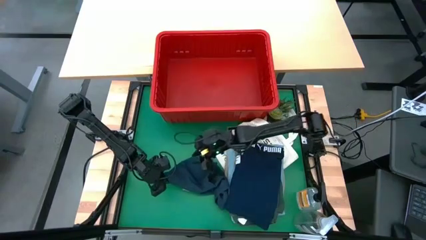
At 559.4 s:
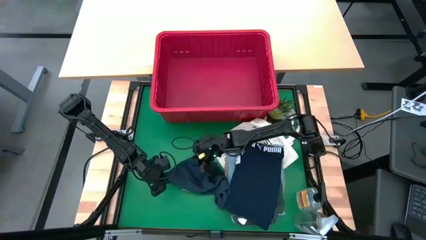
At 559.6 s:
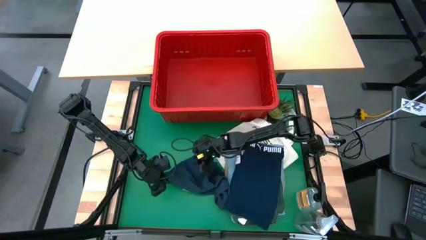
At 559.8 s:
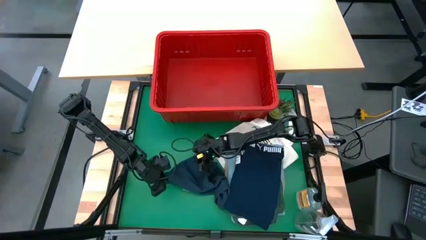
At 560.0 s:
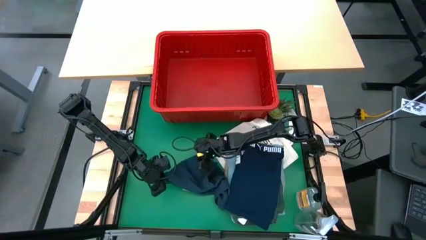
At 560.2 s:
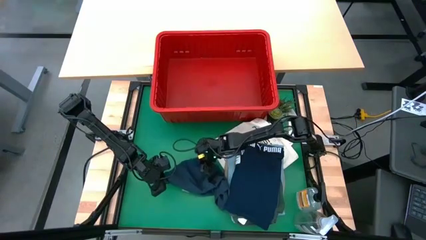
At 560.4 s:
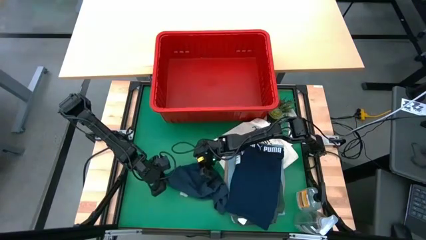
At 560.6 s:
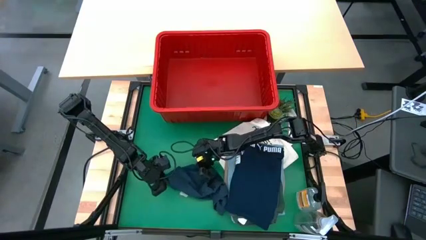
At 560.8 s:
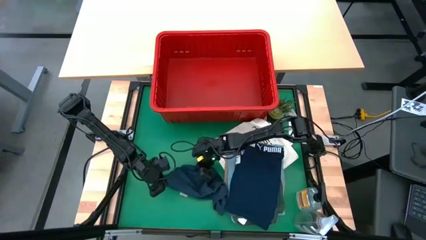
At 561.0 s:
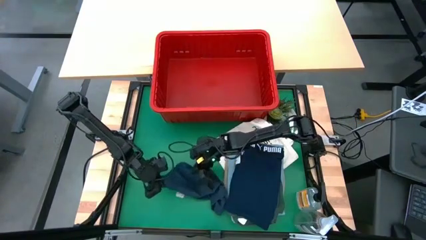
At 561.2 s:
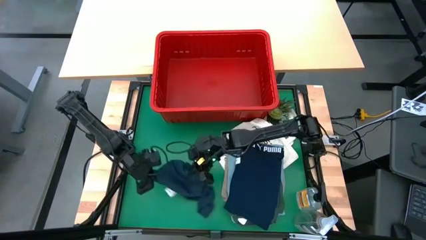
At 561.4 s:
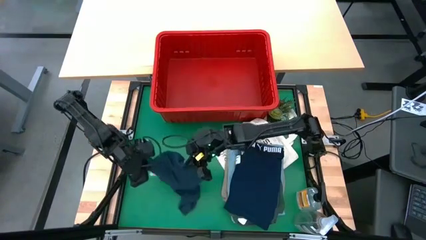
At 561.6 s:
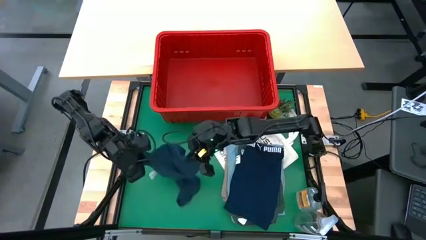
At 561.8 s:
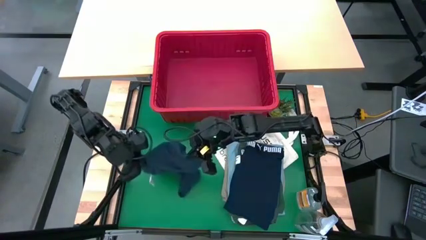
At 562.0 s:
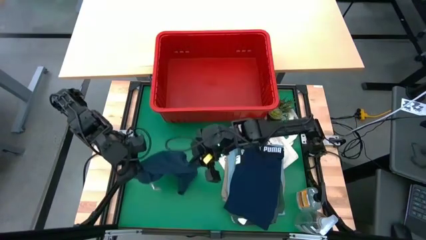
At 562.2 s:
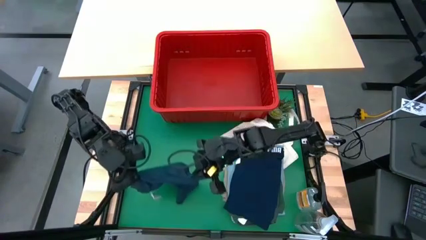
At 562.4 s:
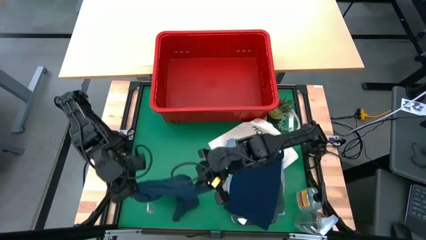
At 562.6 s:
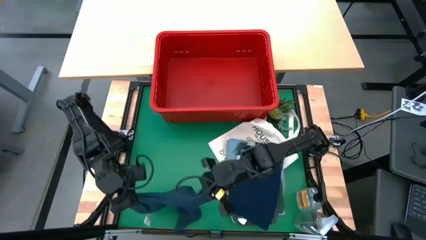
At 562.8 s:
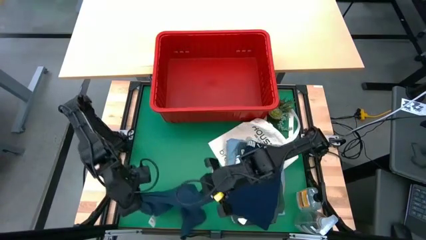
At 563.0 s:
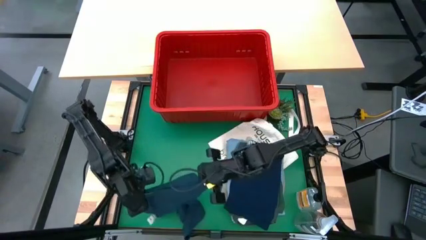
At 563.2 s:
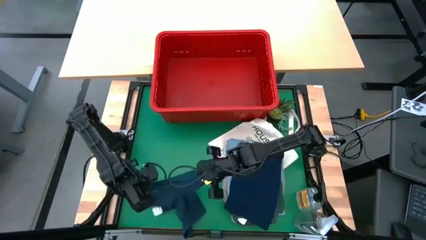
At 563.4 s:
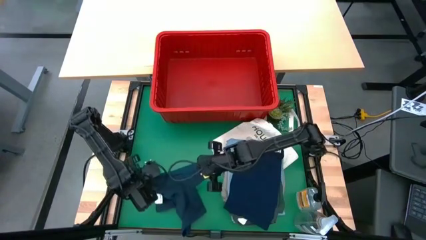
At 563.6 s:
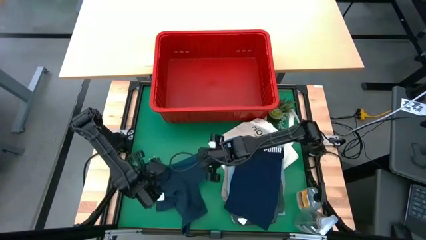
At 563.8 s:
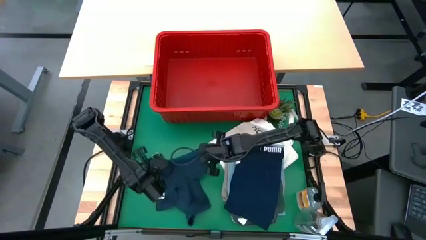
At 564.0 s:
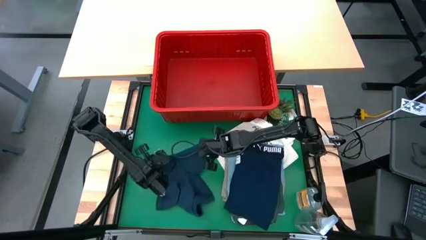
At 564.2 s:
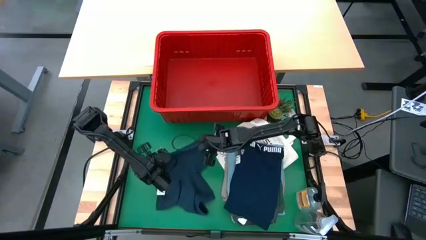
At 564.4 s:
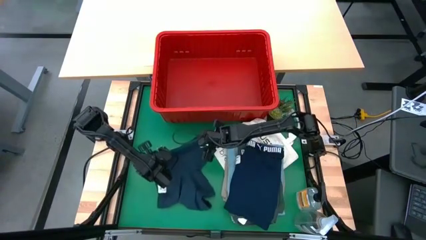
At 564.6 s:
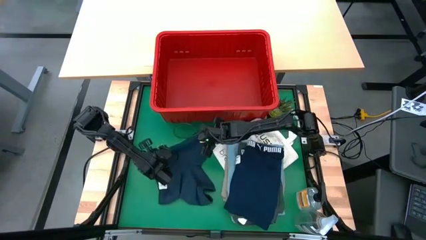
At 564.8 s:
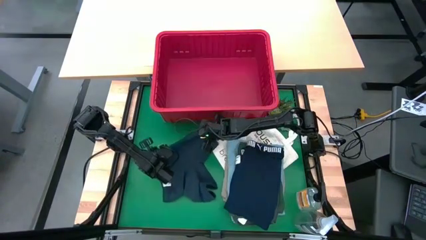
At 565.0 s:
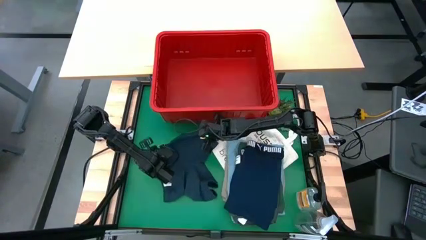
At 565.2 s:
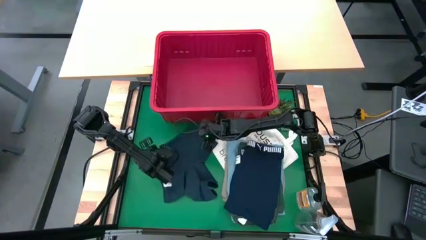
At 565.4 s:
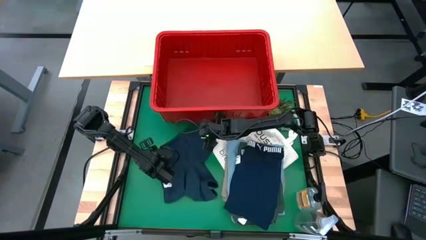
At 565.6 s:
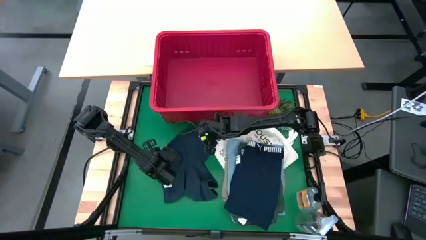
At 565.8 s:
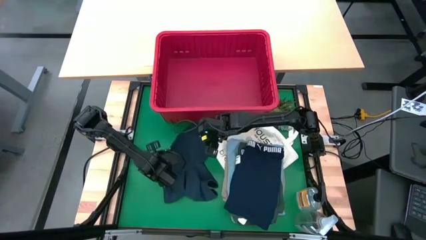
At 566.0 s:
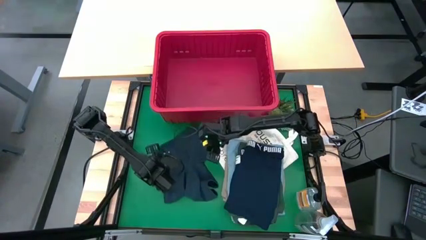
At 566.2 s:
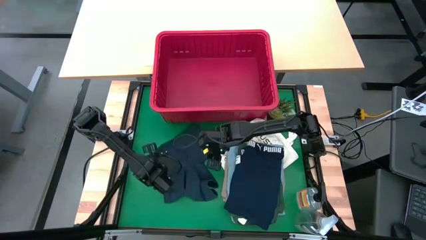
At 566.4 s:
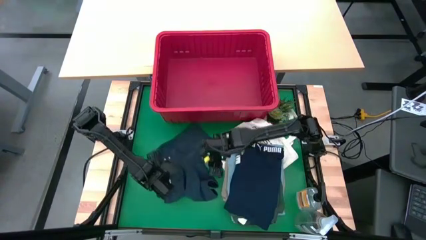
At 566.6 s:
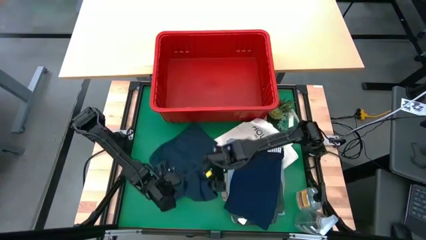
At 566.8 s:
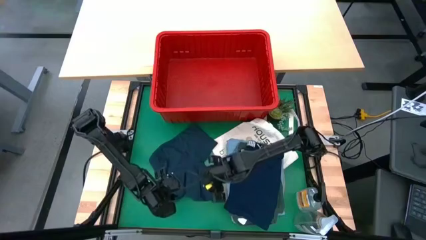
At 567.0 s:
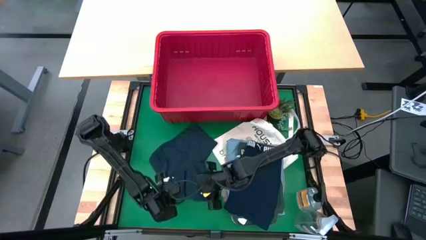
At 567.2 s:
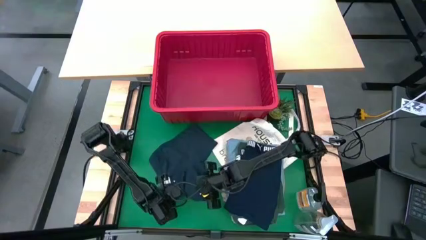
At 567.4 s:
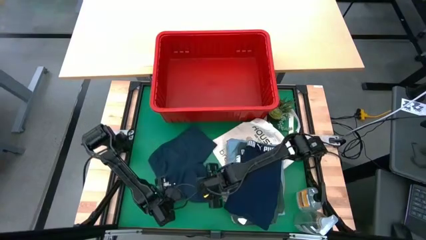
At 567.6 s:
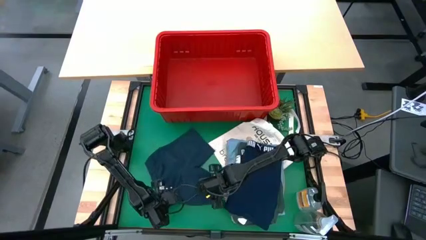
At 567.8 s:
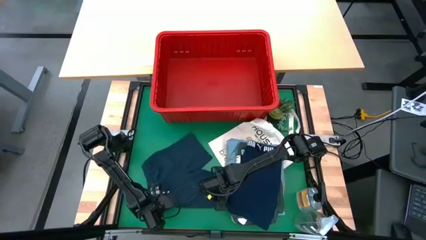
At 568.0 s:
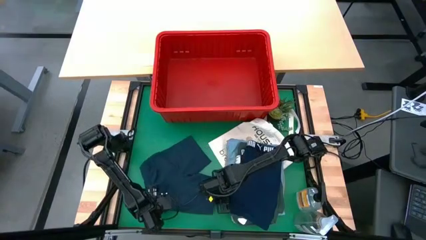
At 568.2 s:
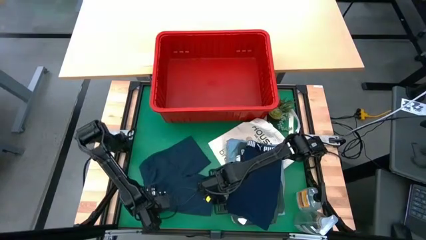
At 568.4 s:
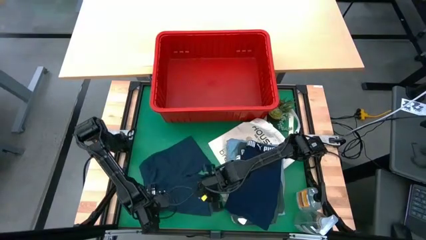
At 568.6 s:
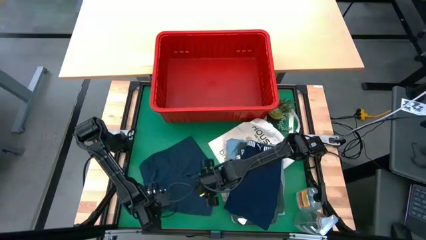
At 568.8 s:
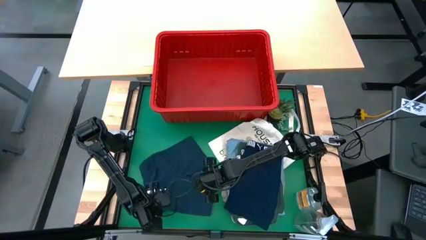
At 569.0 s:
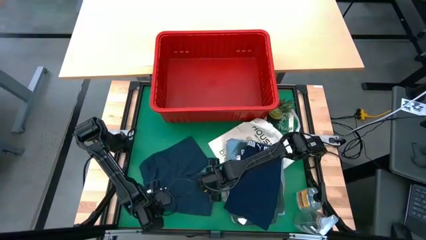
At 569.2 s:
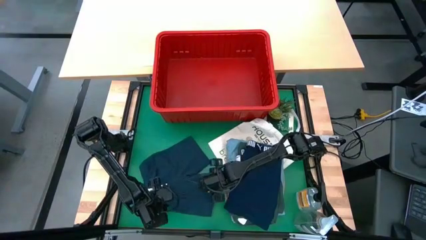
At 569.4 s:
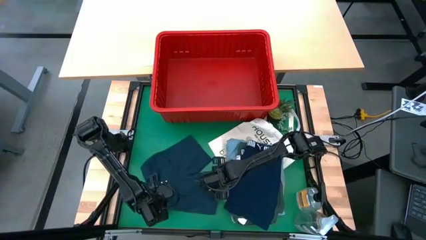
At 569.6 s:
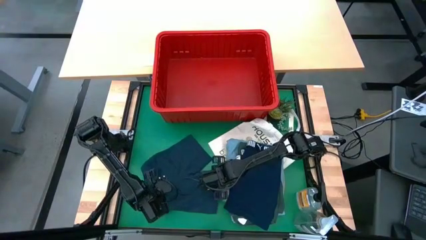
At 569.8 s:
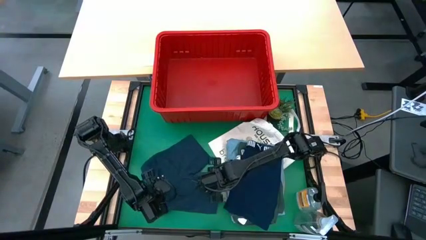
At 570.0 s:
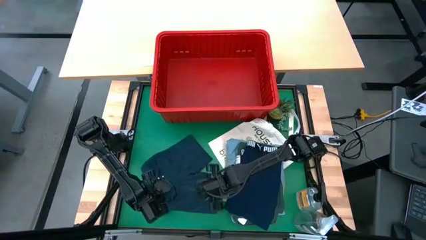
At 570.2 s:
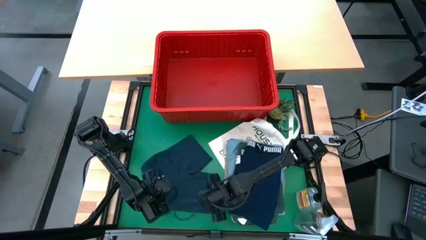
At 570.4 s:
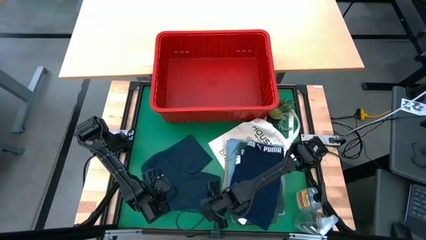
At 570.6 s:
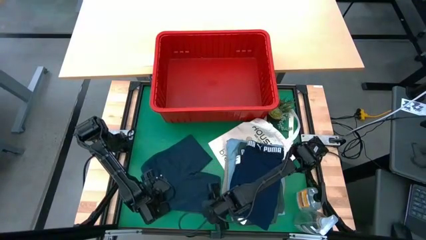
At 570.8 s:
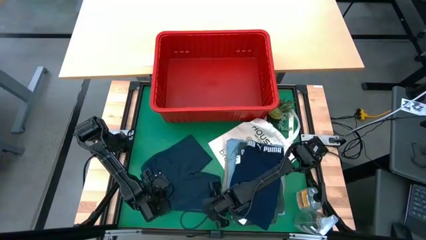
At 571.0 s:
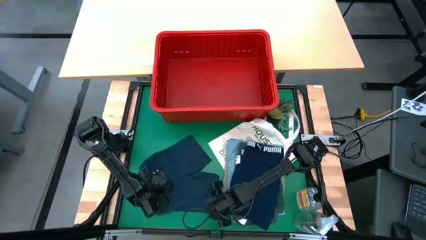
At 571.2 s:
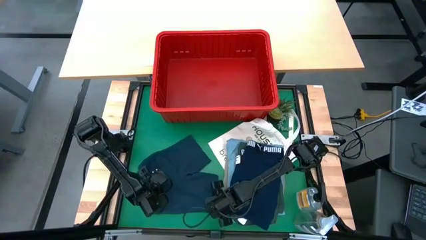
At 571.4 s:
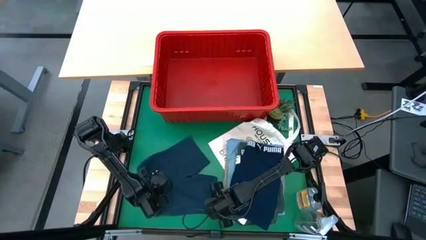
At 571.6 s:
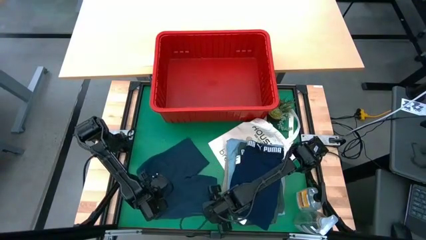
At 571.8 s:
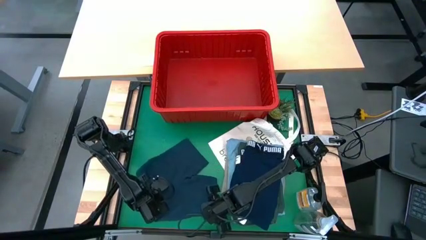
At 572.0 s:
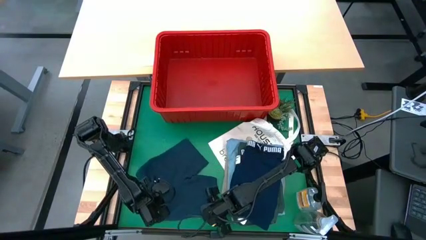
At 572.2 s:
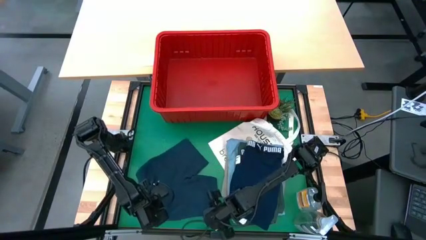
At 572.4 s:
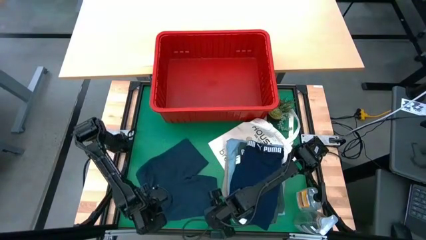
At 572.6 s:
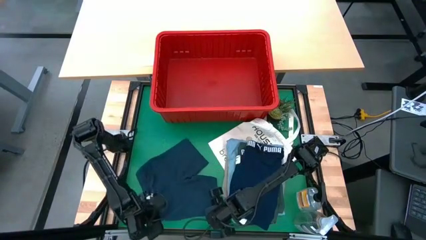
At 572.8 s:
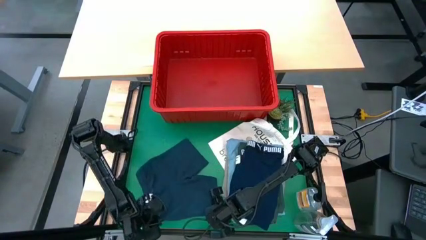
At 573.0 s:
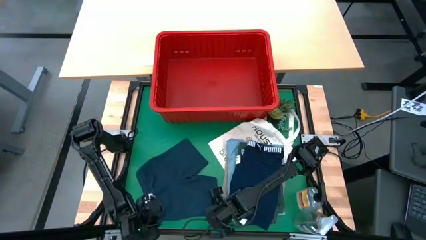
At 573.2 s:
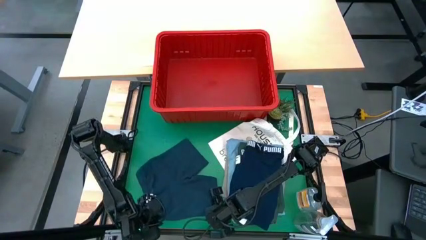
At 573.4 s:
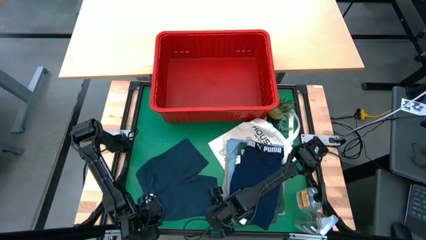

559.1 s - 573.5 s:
Task: Fold Laundry from Bin
Fold the dark gray shorts

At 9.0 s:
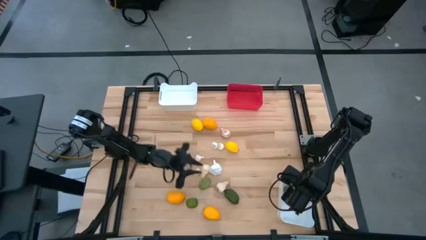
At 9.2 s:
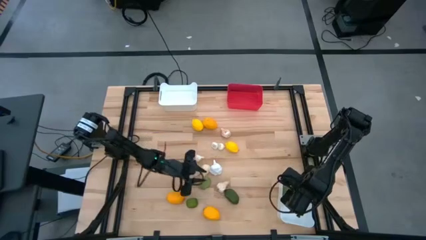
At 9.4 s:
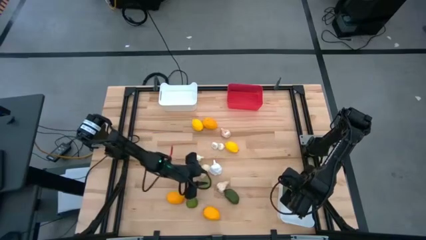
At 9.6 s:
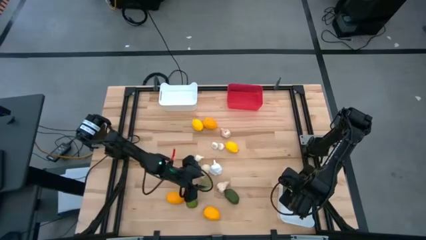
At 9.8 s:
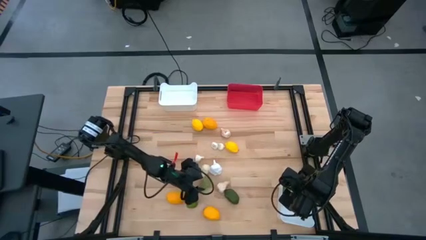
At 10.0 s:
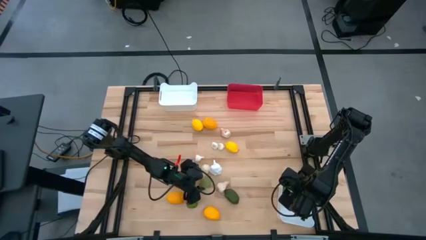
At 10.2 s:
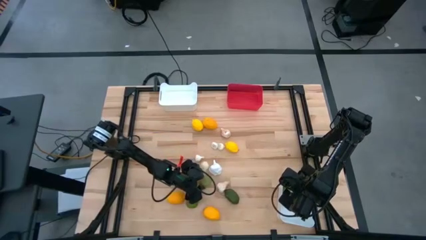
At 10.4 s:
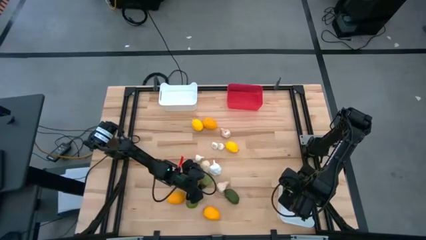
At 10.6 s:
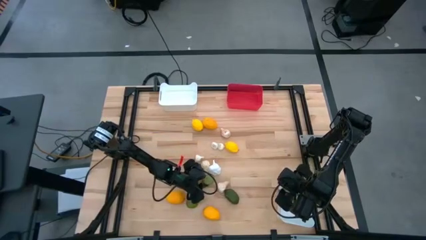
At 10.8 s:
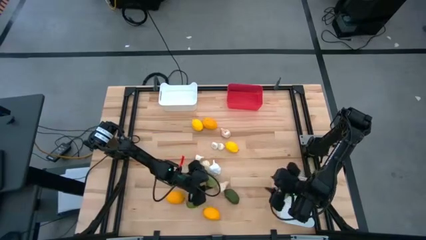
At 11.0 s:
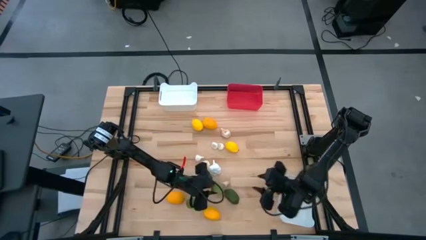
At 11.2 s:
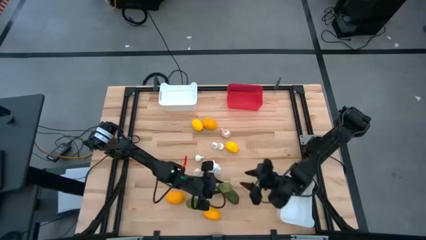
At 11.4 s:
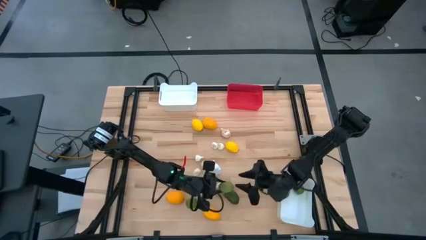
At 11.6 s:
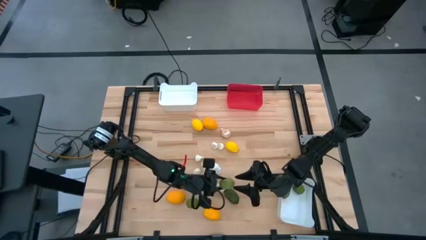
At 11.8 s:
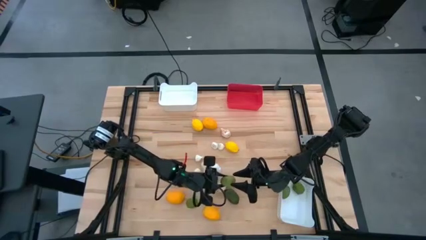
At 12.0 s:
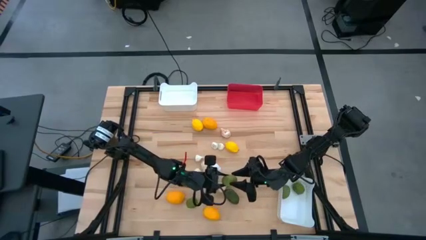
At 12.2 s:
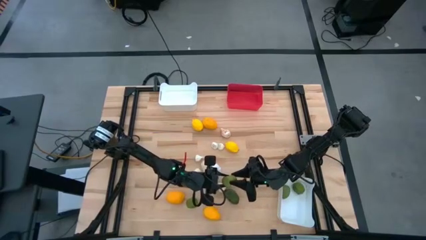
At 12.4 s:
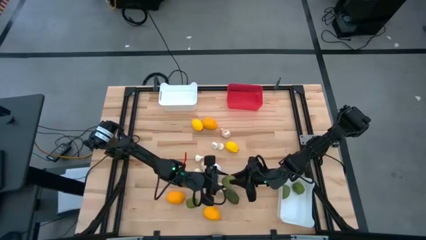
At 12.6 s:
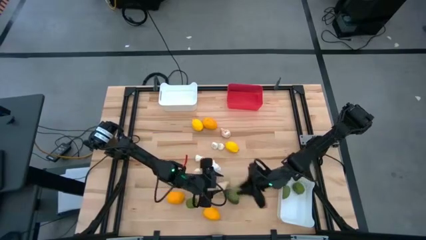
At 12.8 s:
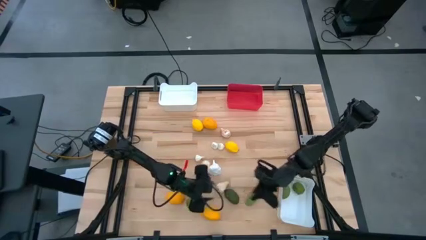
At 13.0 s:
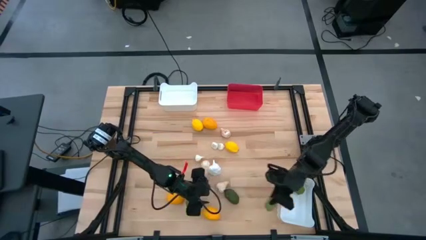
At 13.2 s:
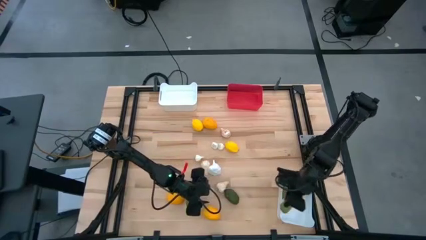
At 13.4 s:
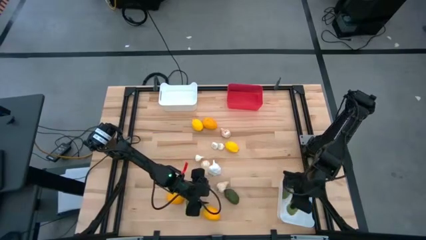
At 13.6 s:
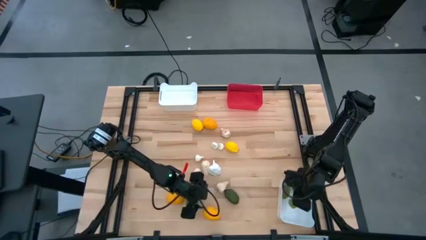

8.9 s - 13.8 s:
Task: Sort produce into baskets
Put the green lime into the bottom white bin
